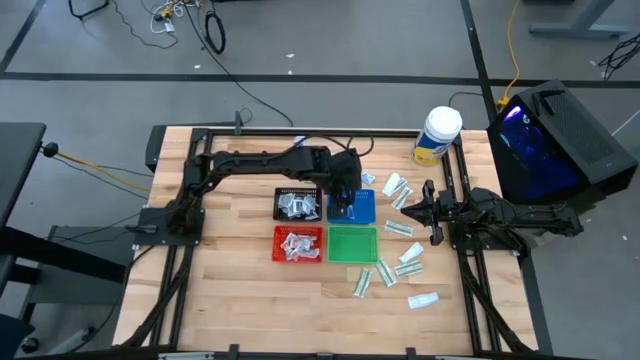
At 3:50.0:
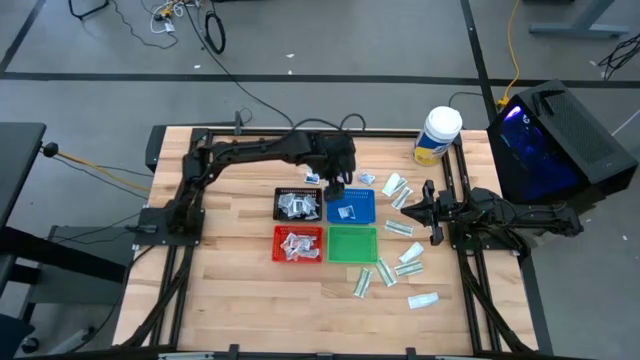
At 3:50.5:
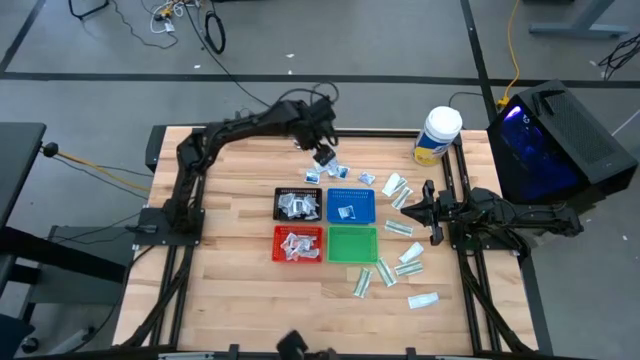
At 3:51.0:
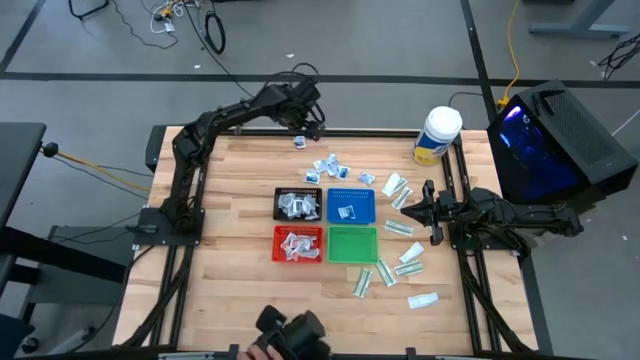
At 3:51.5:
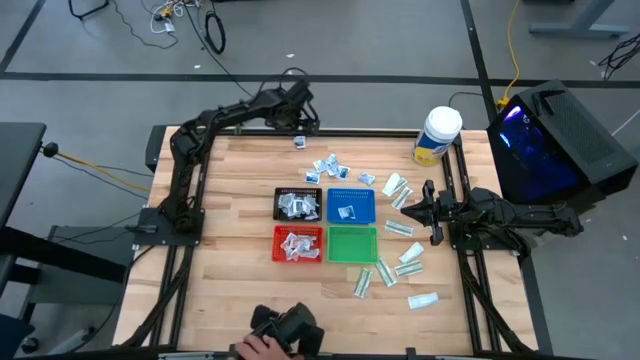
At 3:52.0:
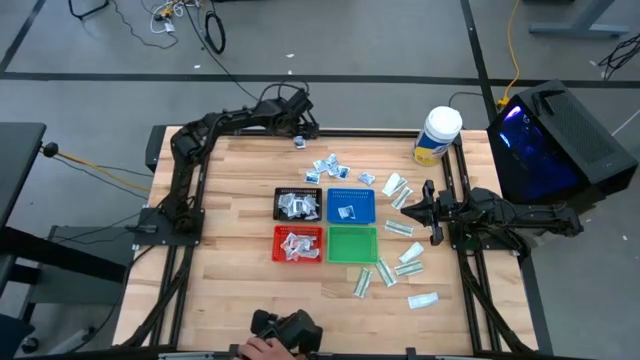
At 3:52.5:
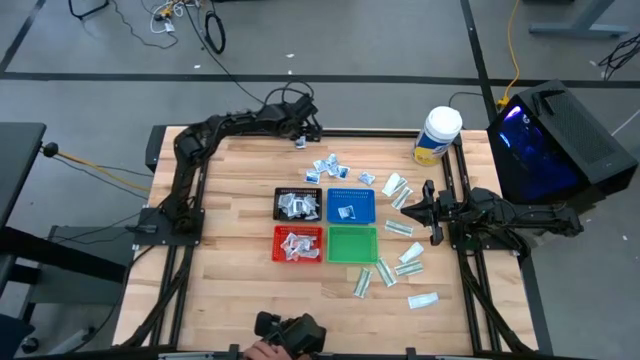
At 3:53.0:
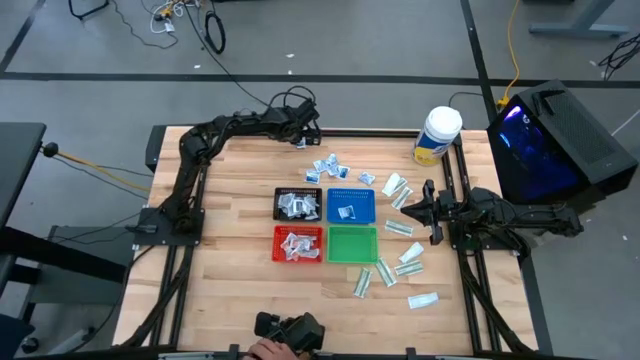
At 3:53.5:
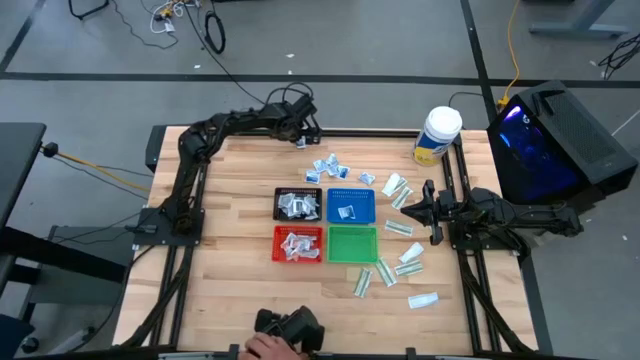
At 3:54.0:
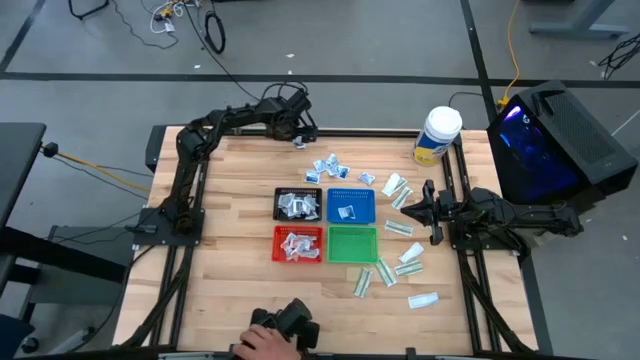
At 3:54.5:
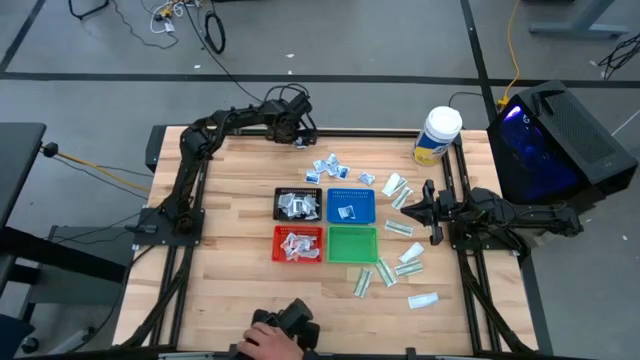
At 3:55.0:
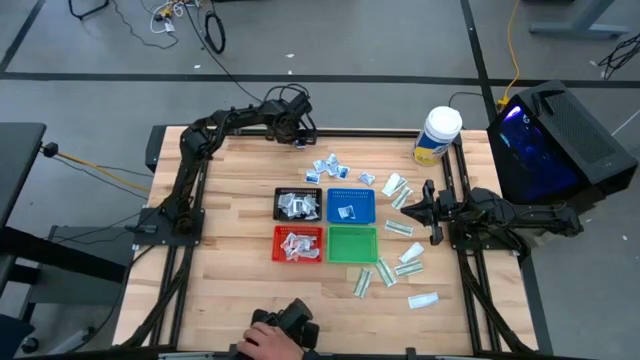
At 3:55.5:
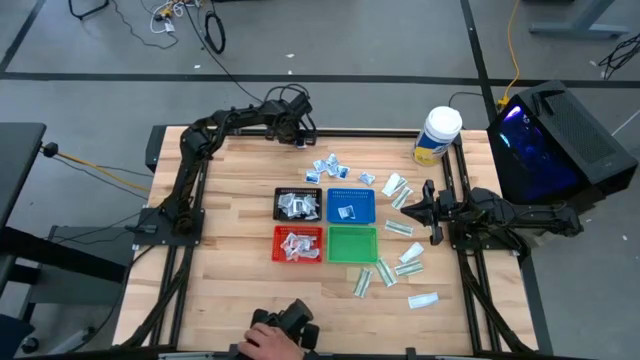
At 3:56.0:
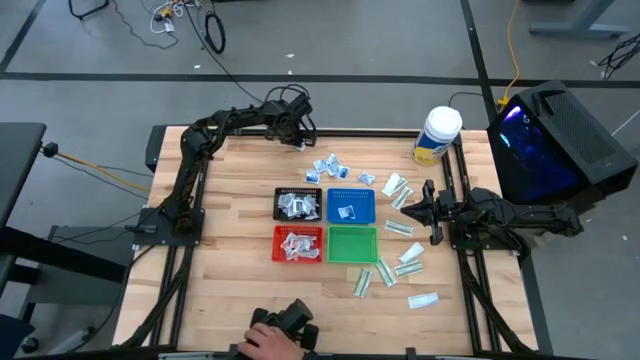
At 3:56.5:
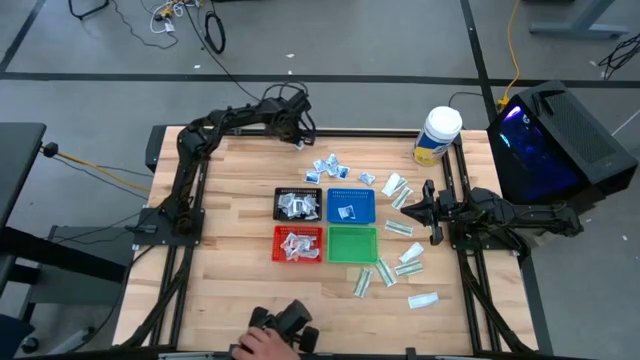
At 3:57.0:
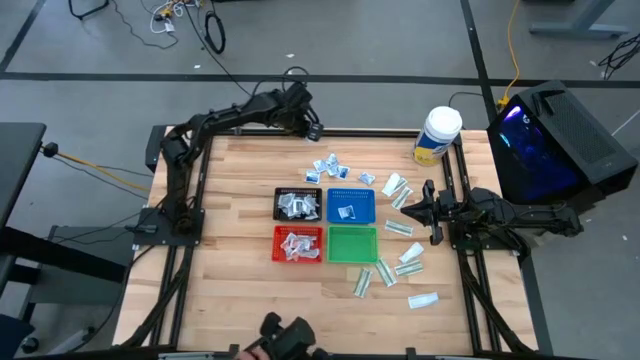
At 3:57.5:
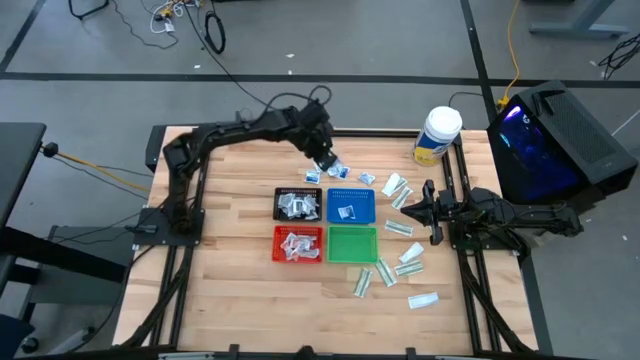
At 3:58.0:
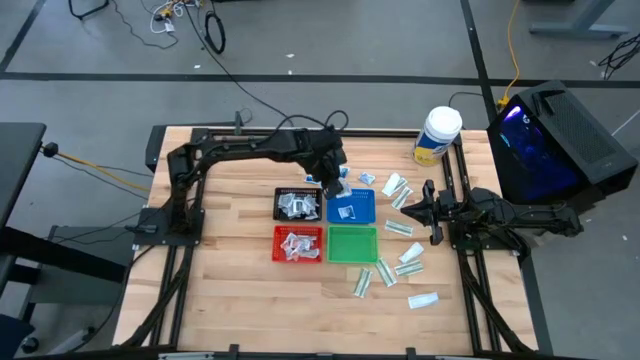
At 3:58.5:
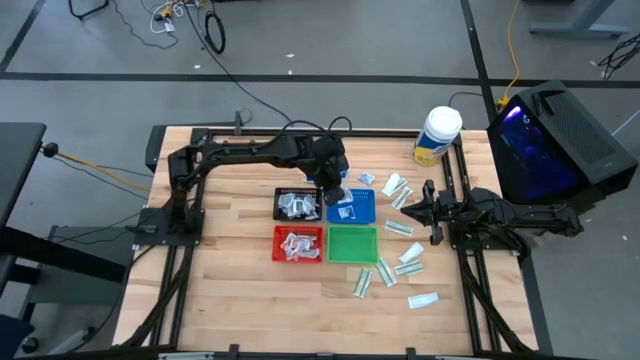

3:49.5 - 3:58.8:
Task: Pick & Place First Aid Supplies
Put the blue alcohol pad into the blue bin

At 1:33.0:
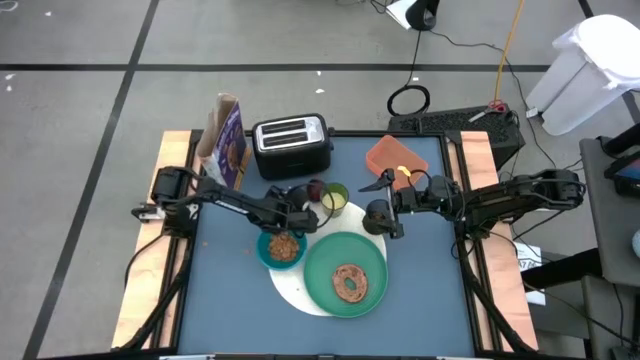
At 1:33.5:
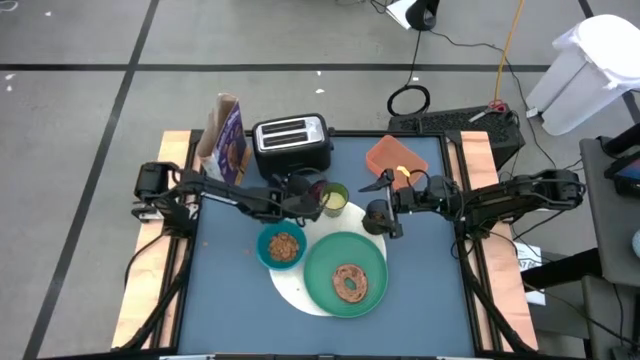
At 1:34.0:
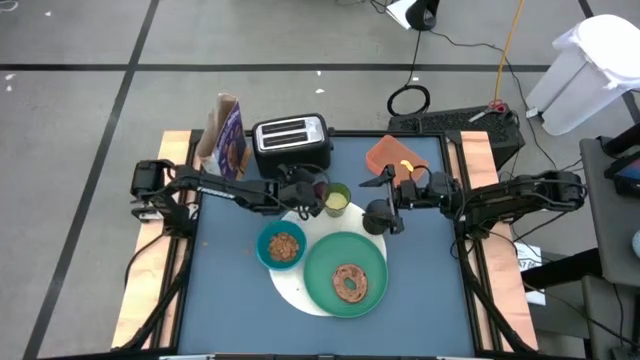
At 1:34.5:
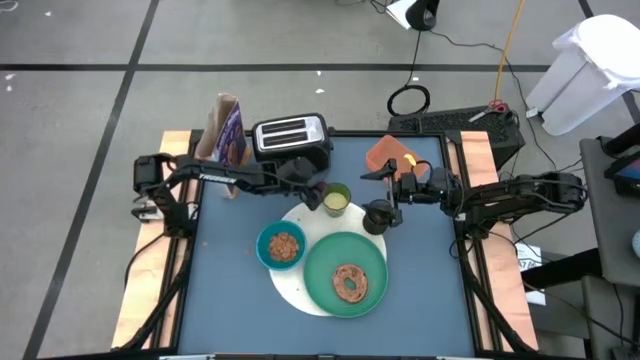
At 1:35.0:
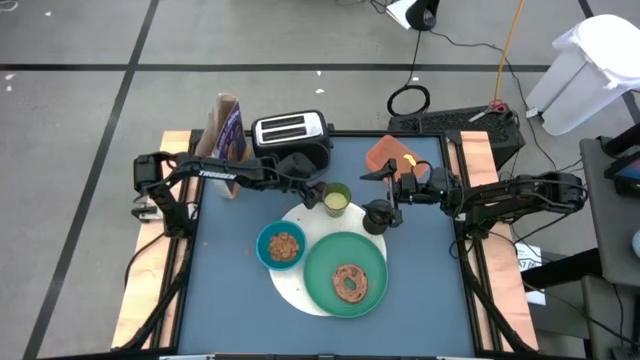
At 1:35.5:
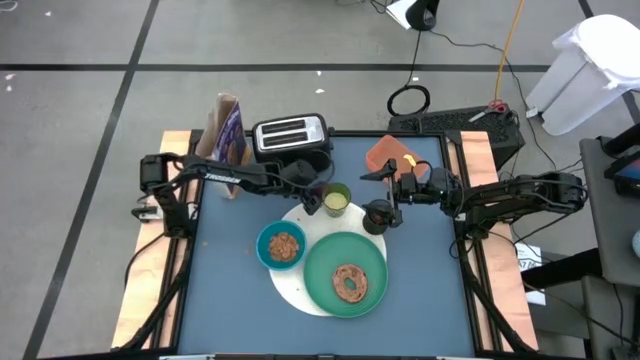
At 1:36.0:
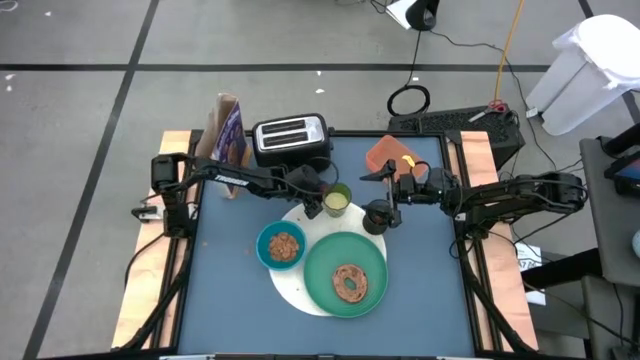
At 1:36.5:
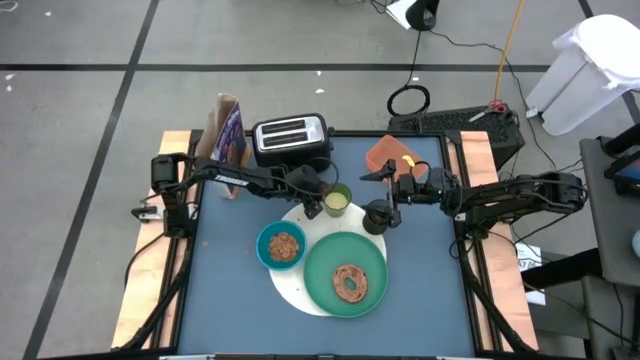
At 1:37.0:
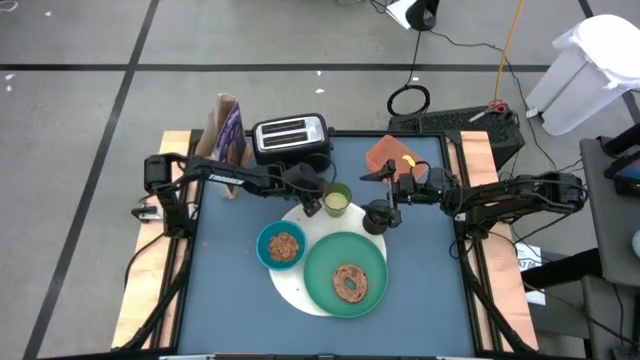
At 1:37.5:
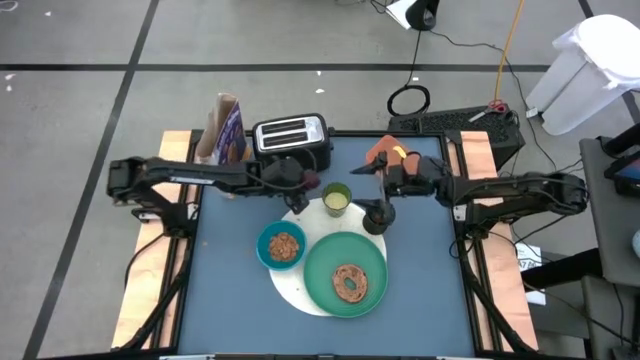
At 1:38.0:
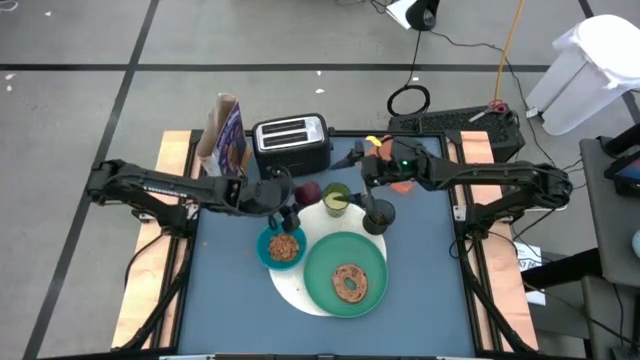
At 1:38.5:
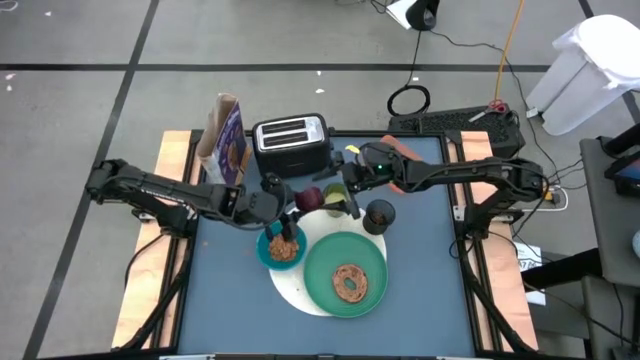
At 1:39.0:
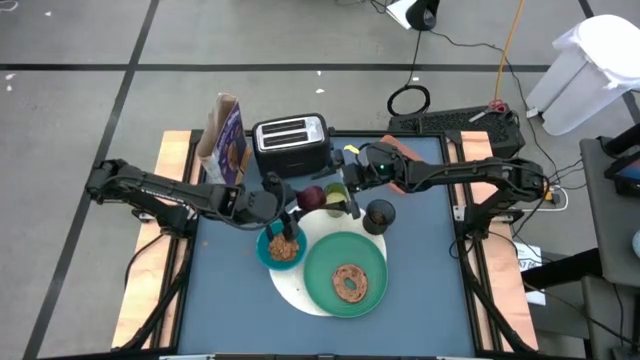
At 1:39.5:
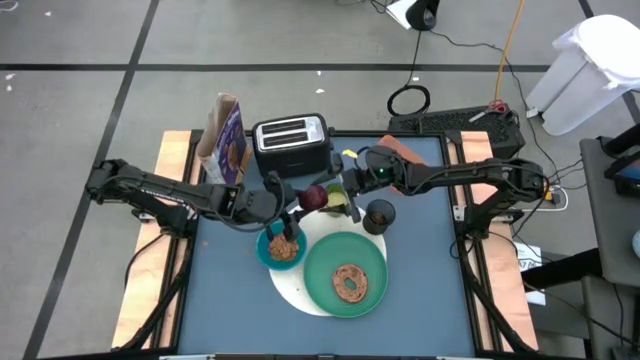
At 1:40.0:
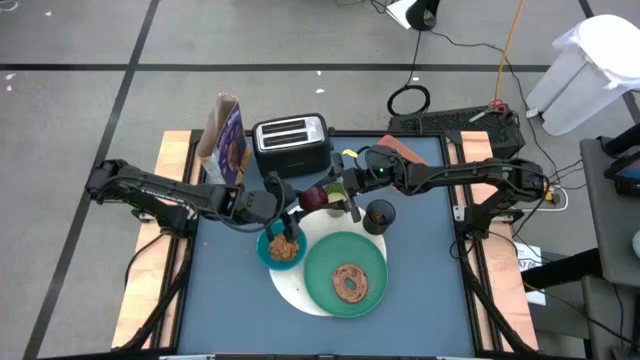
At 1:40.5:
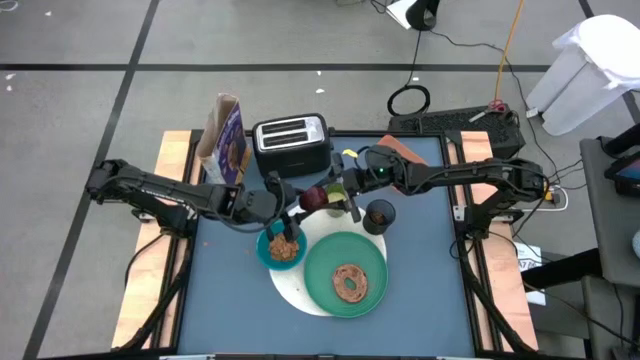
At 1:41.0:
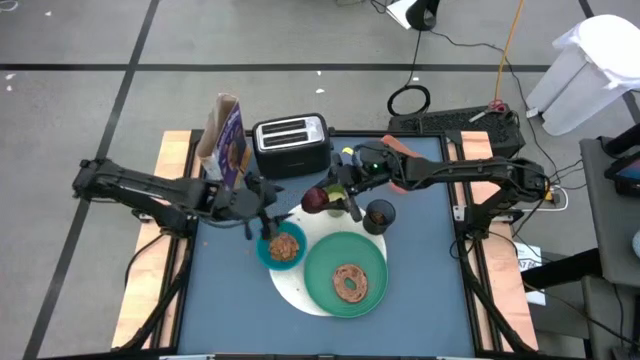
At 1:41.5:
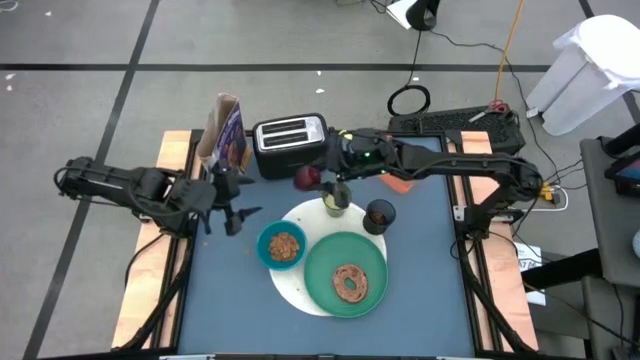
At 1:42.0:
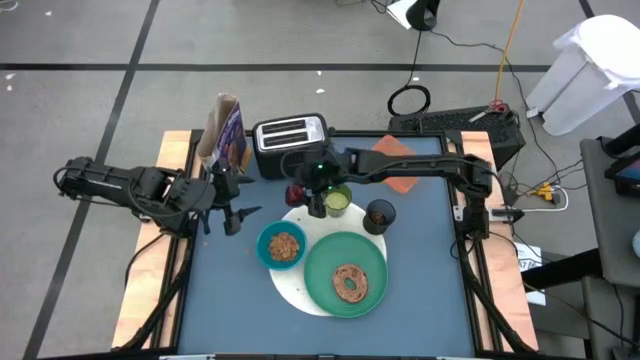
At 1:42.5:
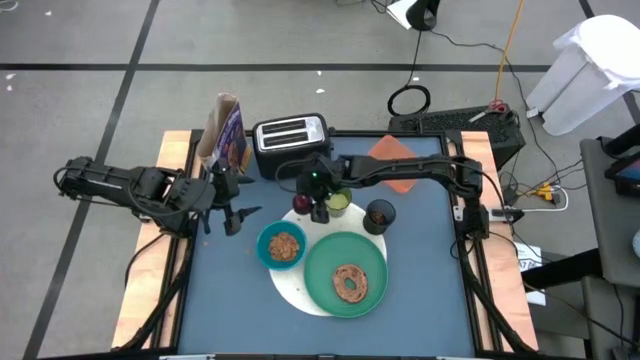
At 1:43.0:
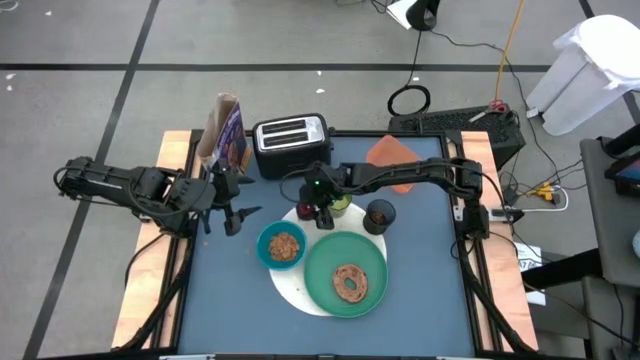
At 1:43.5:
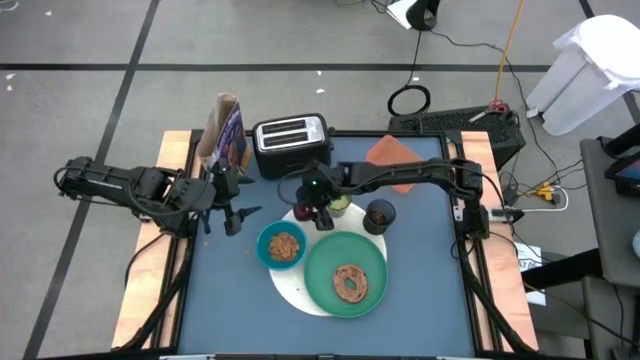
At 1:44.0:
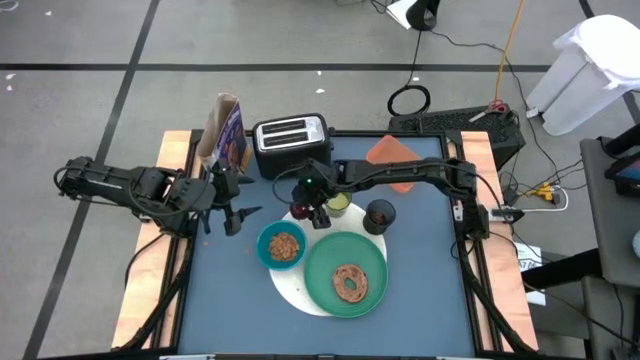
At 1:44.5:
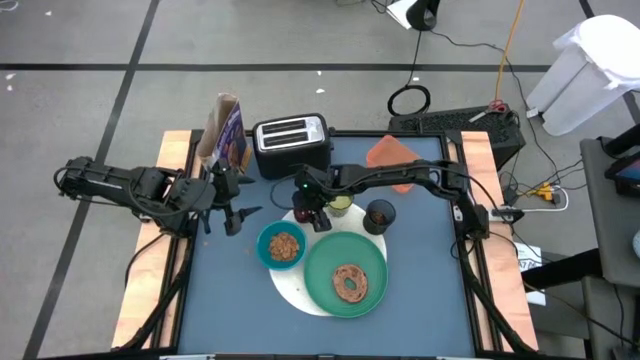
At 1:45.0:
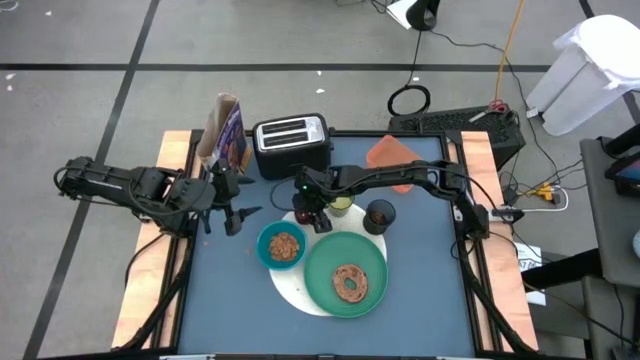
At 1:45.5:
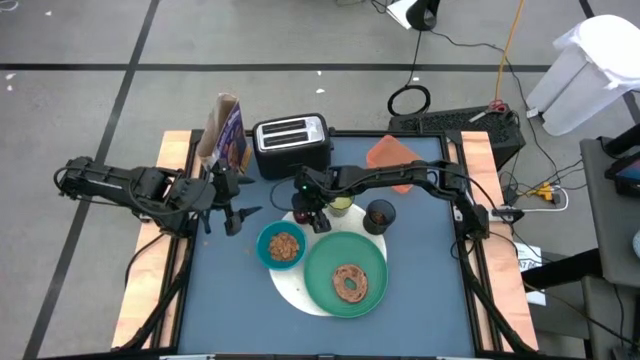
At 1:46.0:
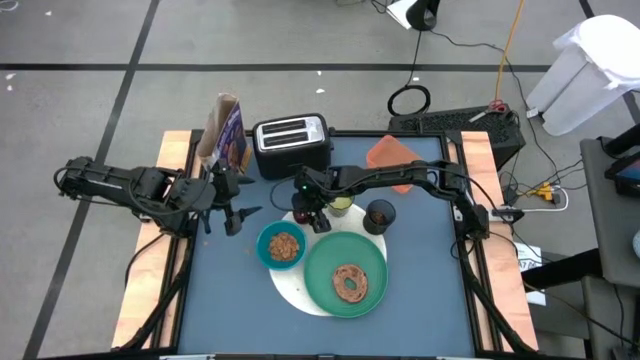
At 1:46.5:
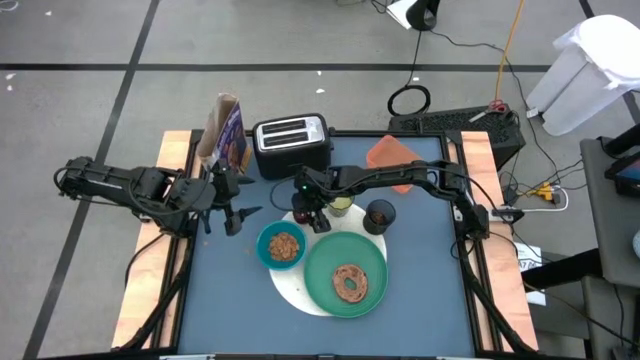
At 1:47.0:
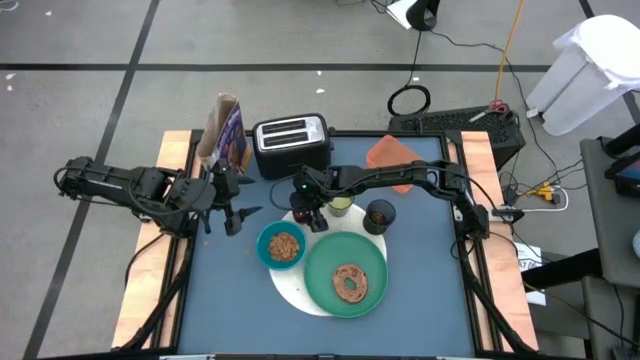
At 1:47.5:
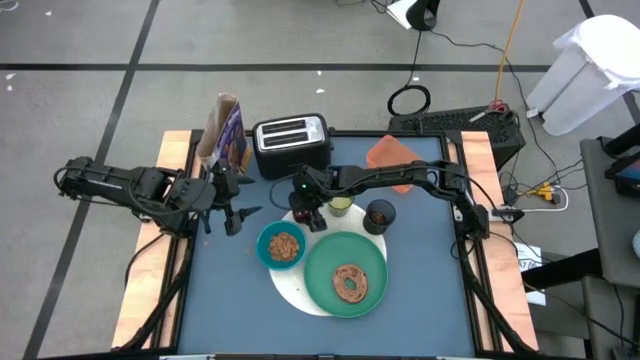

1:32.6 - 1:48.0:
Task: Arrange a breakfast setting
Put the red apple on the white mat
